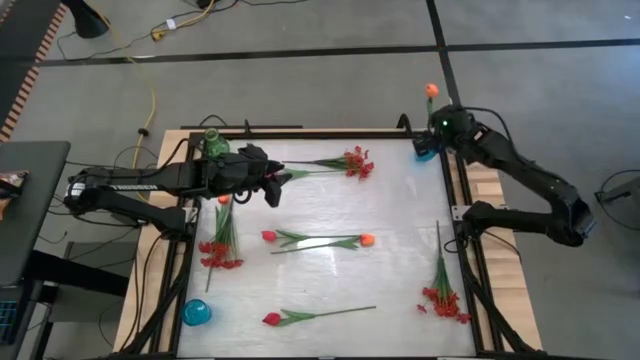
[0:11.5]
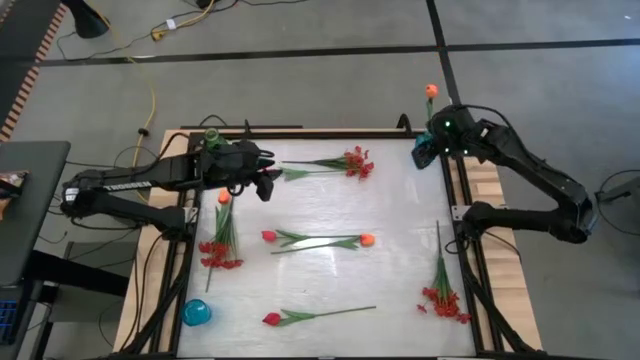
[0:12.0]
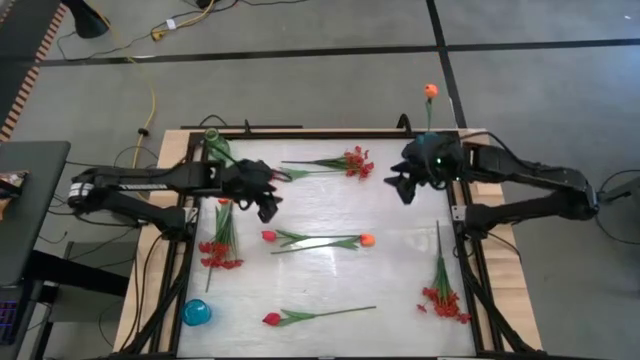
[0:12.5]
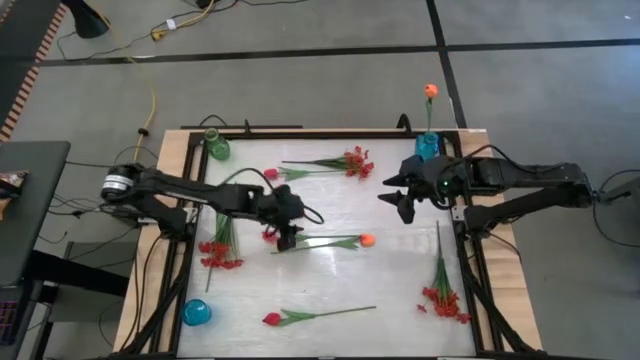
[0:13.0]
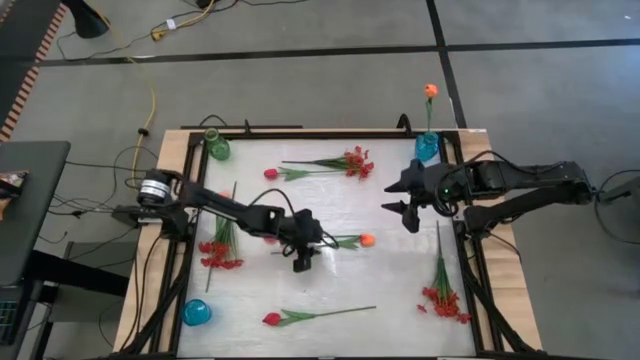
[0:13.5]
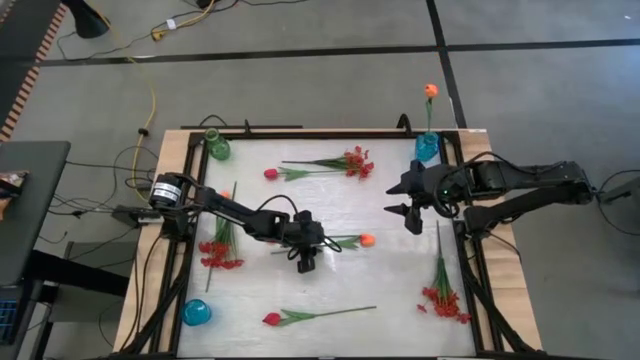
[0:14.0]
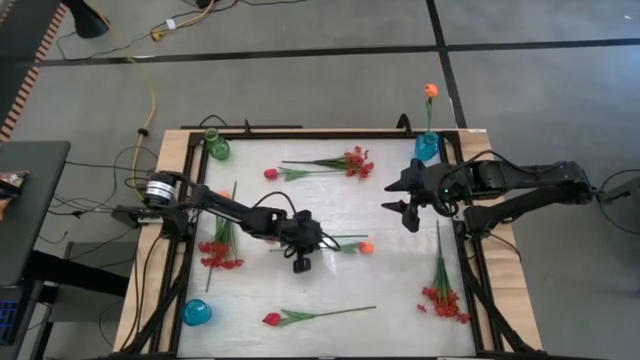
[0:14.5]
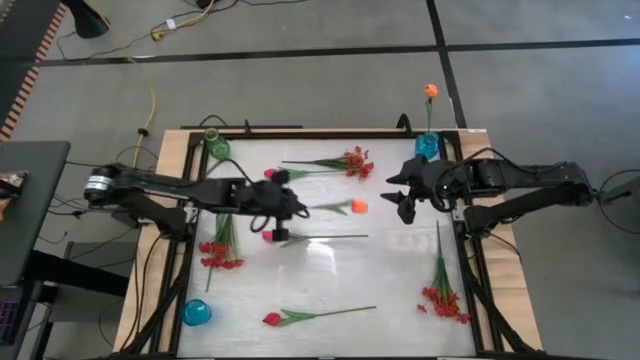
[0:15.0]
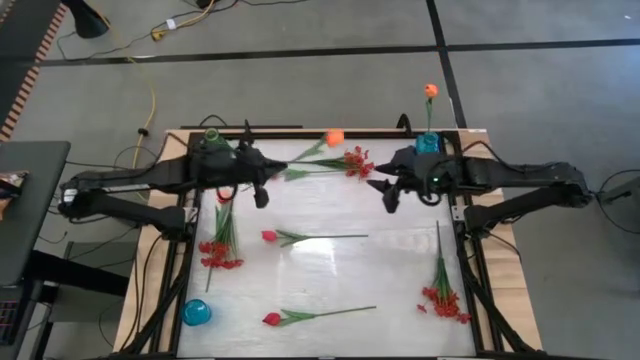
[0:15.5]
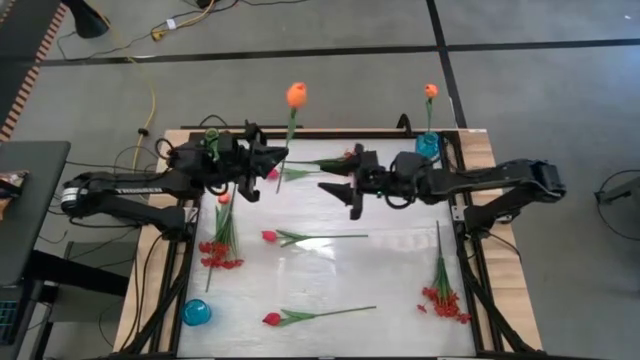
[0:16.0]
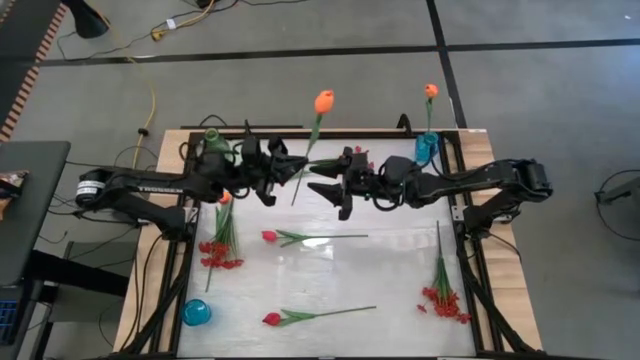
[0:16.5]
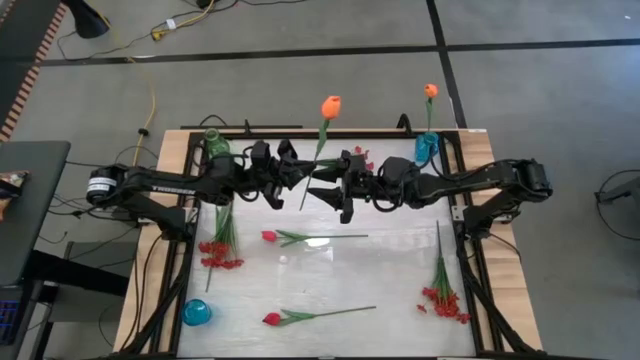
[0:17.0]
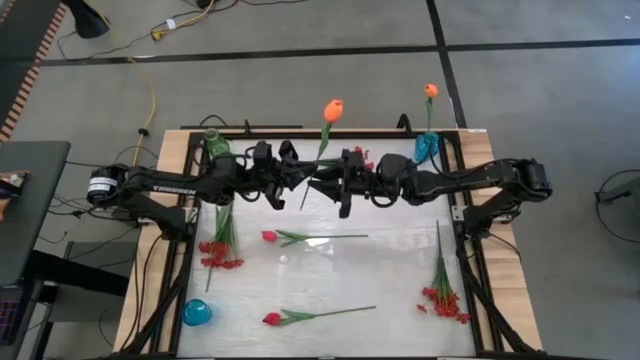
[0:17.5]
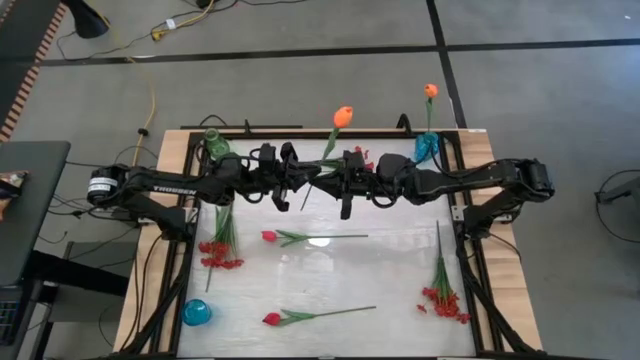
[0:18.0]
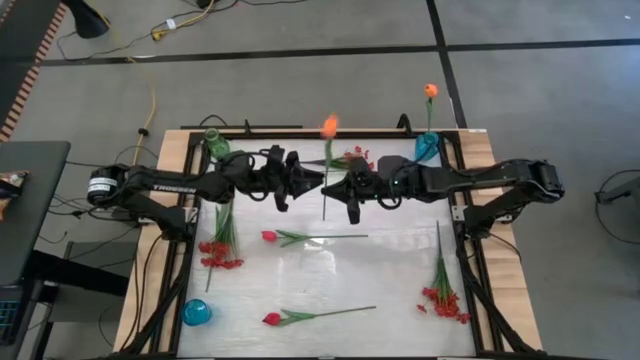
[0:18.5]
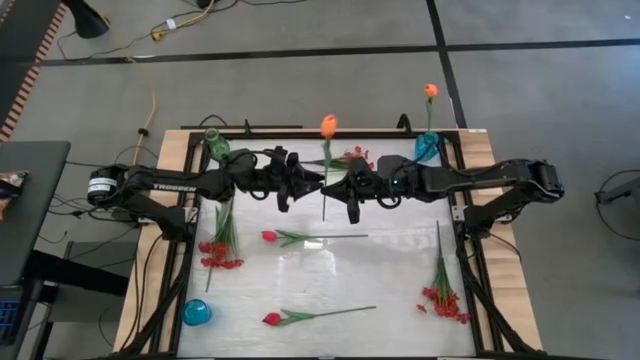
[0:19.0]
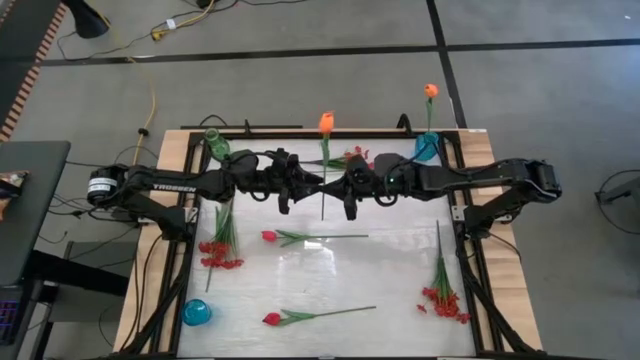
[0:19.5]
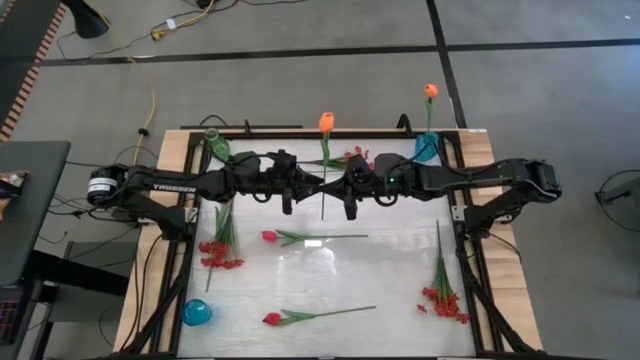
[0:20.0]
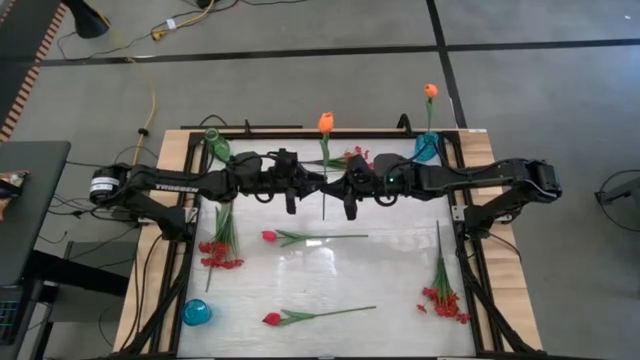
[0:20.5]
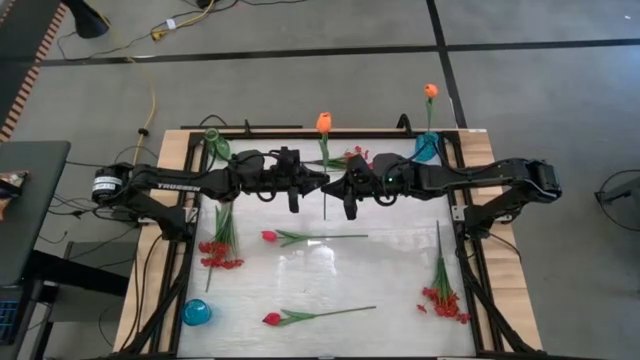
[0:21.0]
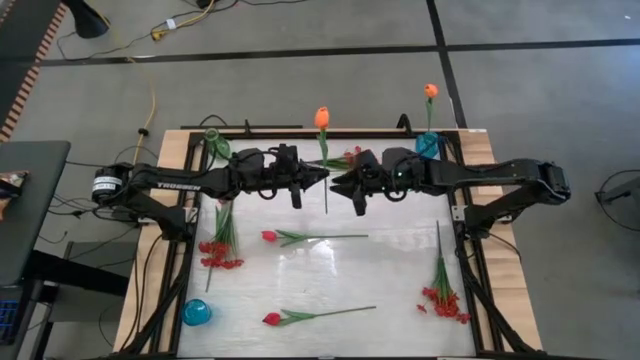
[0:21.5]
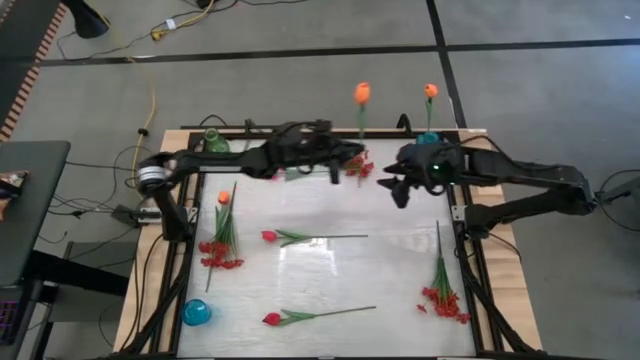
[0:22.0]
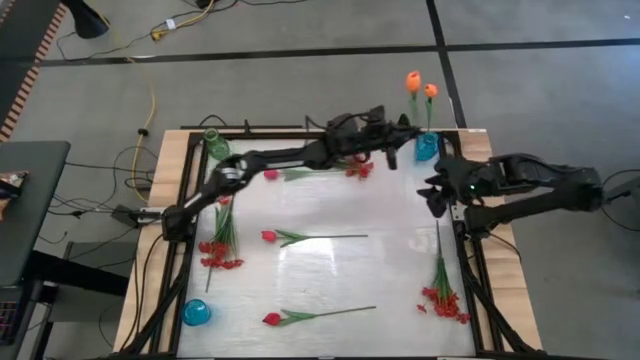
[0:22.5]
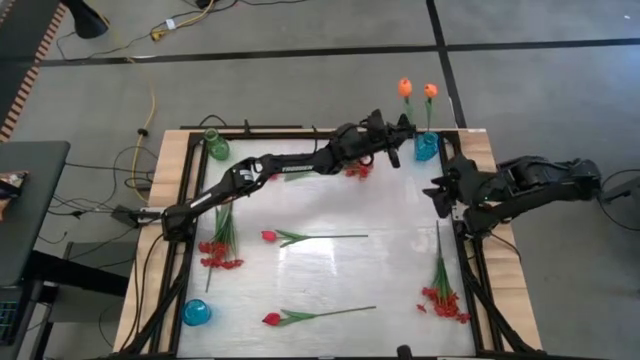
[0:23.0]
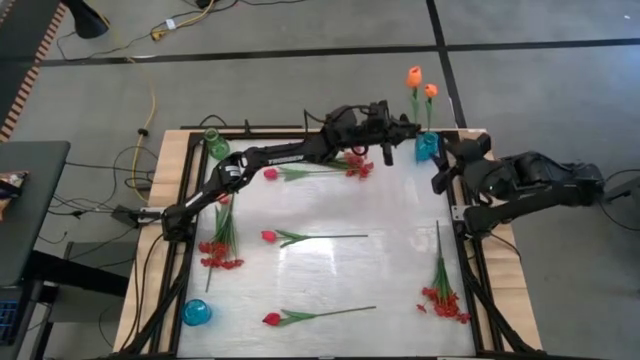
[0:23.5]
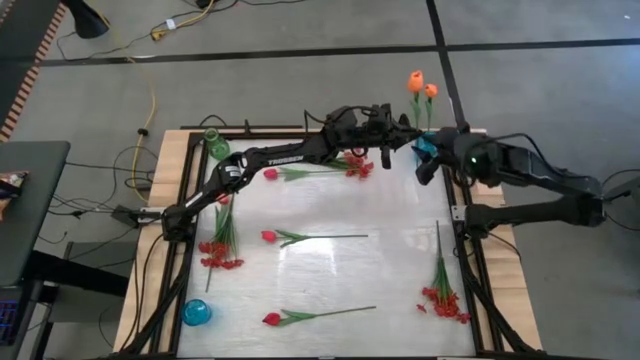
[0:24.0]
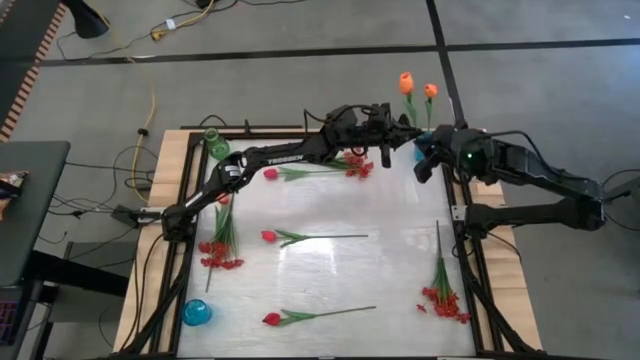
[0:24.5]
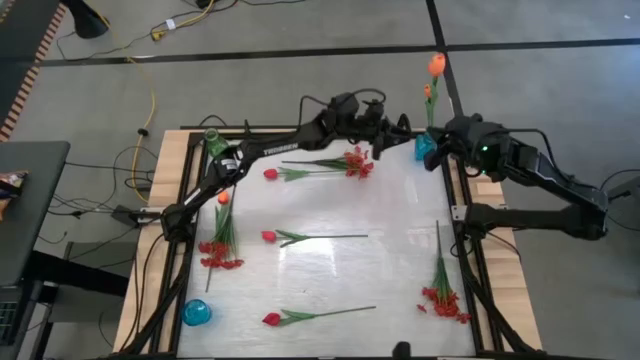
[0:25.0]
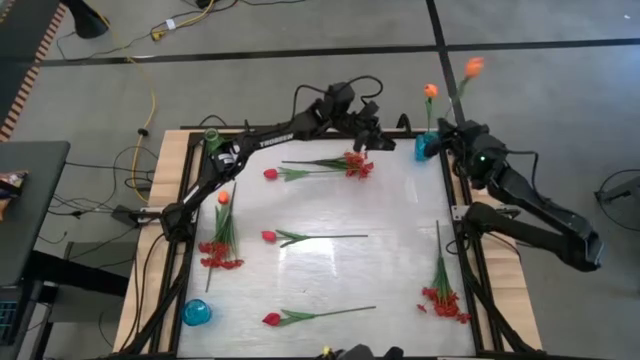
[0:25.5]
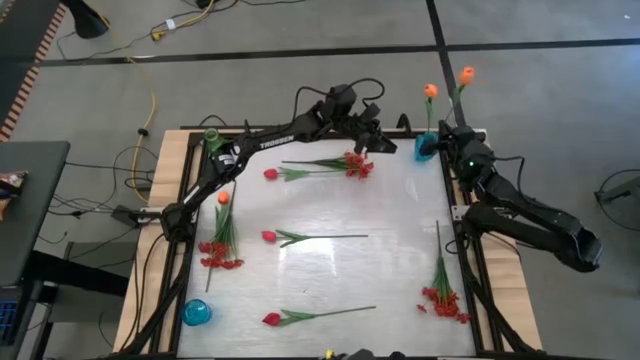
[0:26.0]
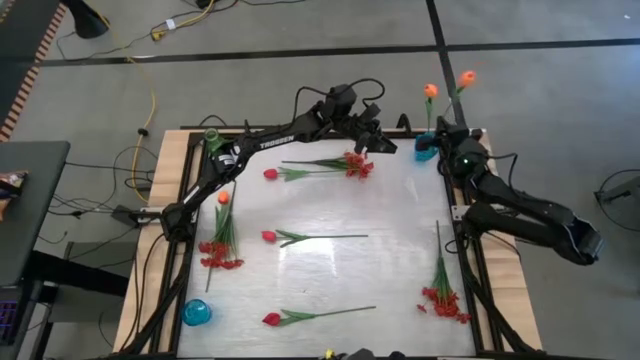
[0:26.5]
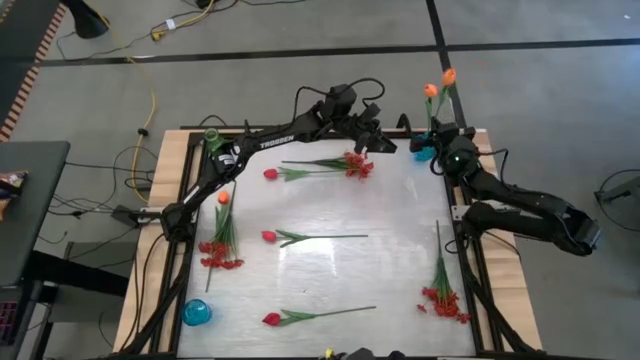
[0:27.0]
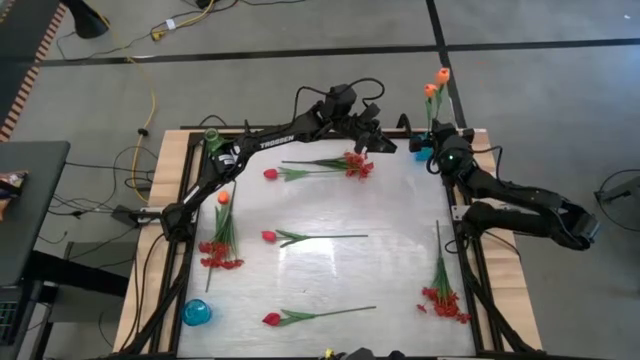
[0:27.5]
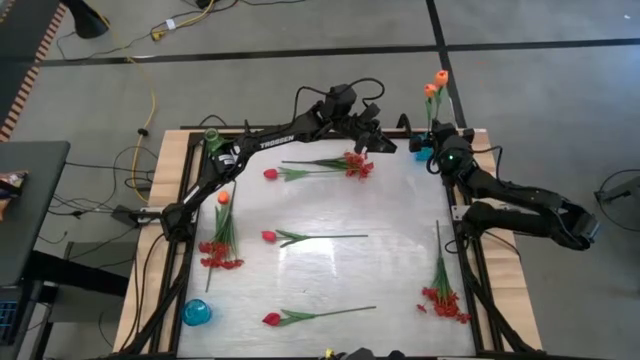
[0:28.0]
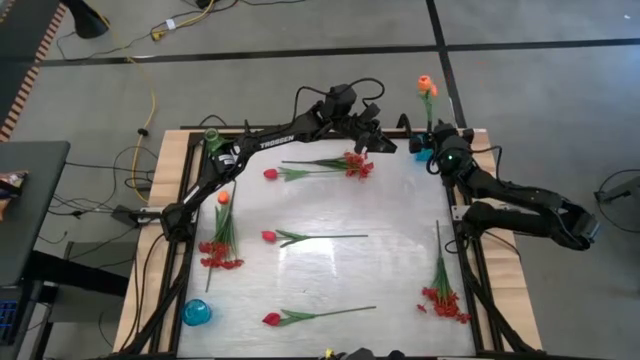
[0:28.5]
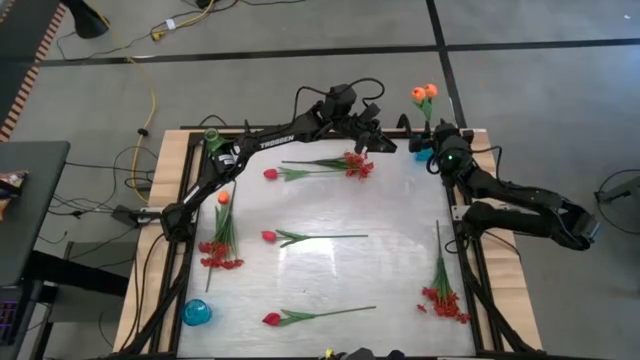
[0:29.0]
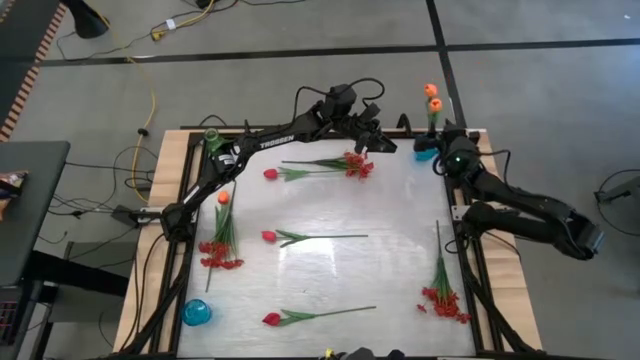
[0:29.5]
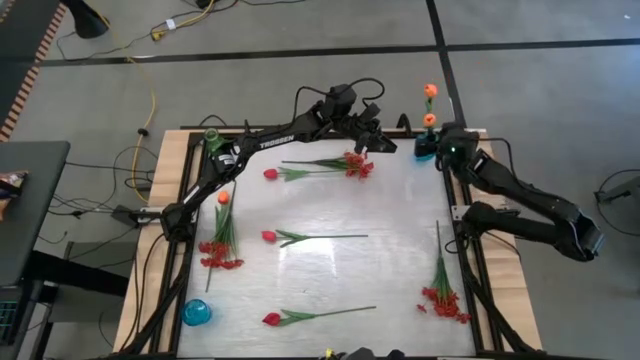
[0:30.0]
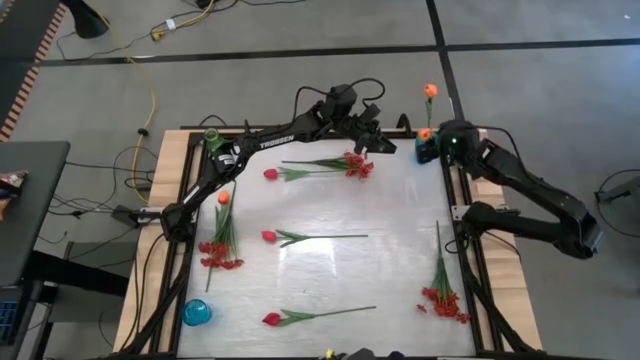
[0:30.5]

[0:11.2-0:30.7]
Task: Sort flowers into vase by color
Put the right orange tulip into the top blue vase
